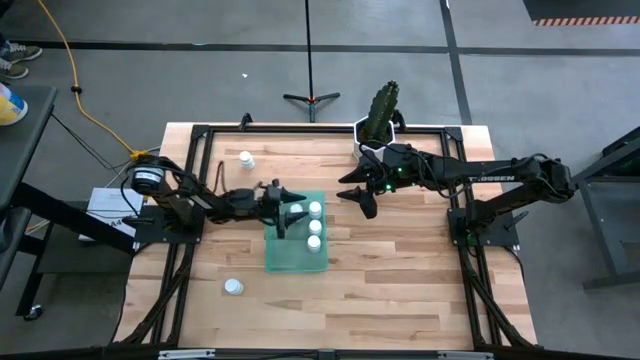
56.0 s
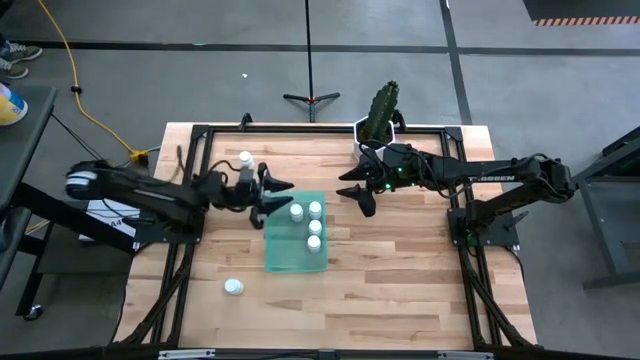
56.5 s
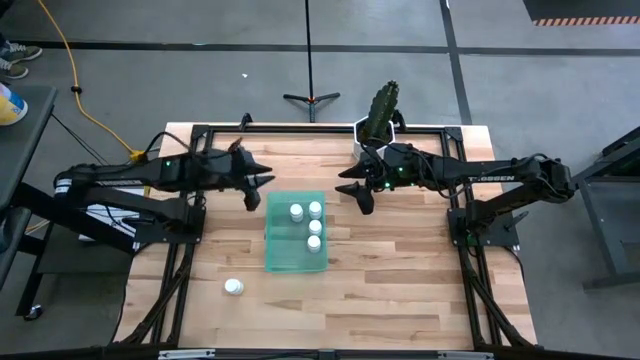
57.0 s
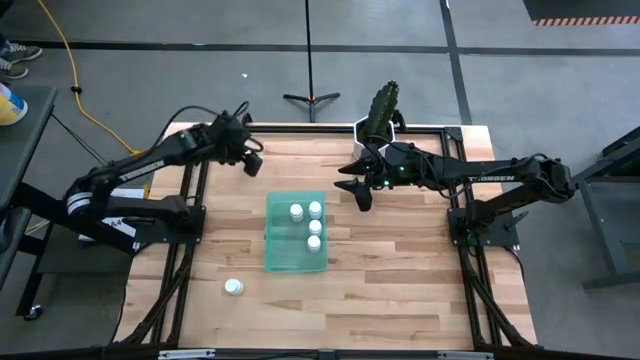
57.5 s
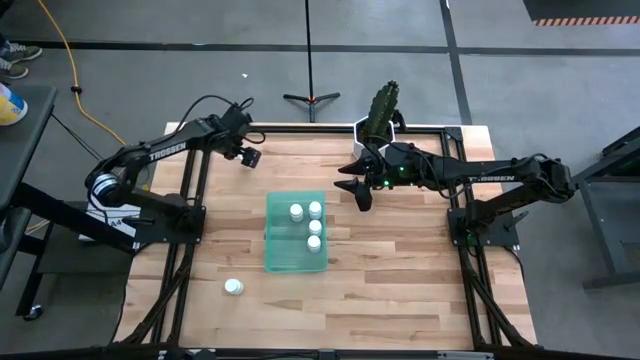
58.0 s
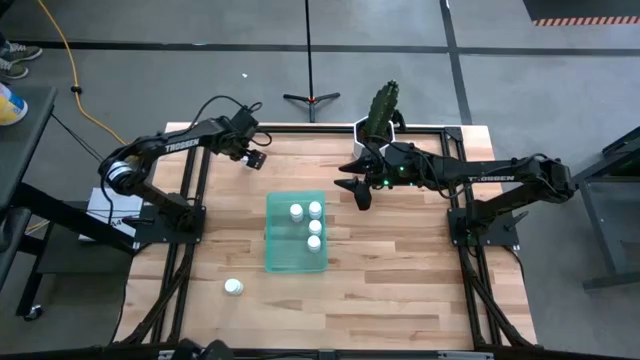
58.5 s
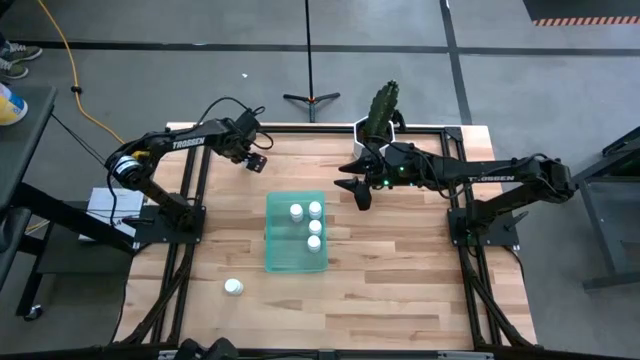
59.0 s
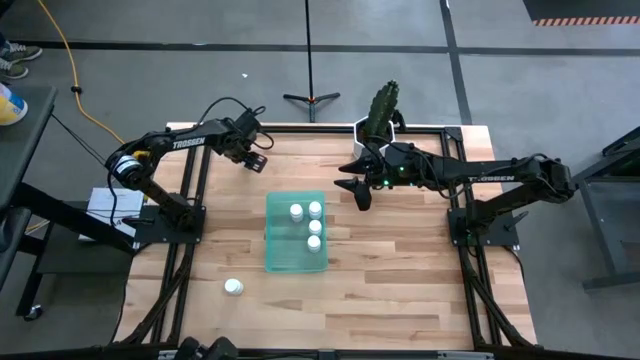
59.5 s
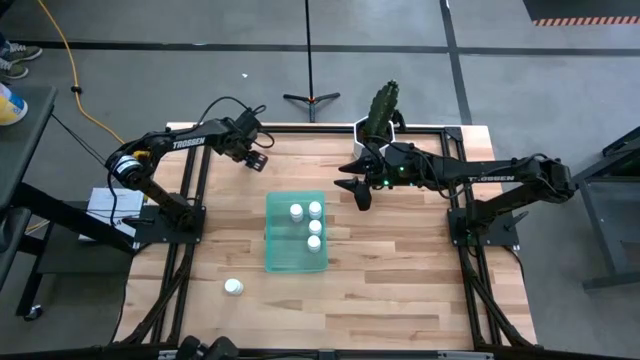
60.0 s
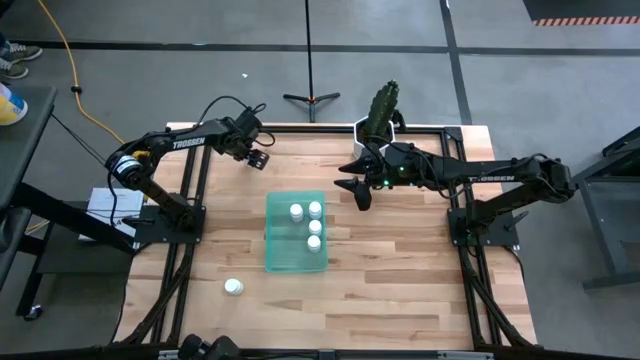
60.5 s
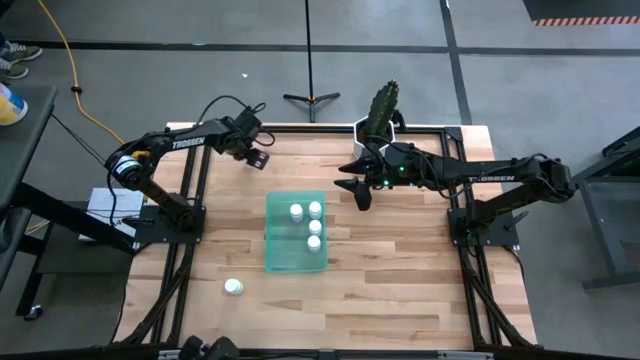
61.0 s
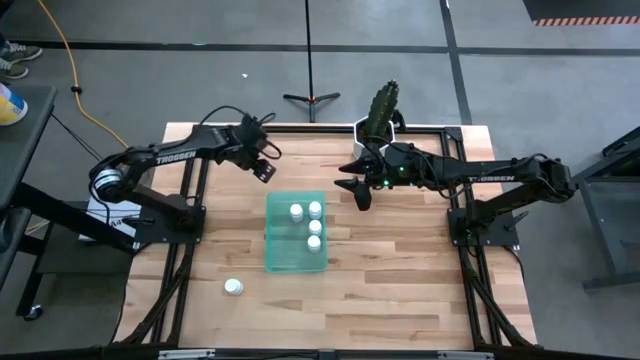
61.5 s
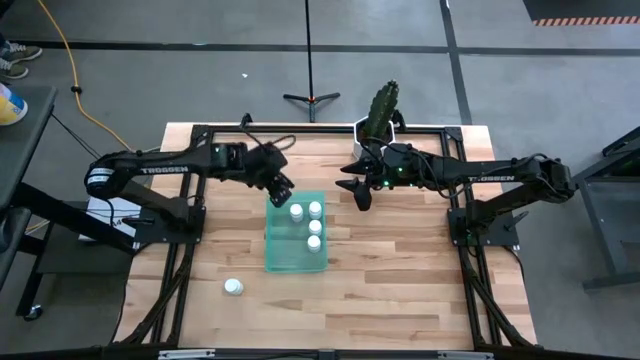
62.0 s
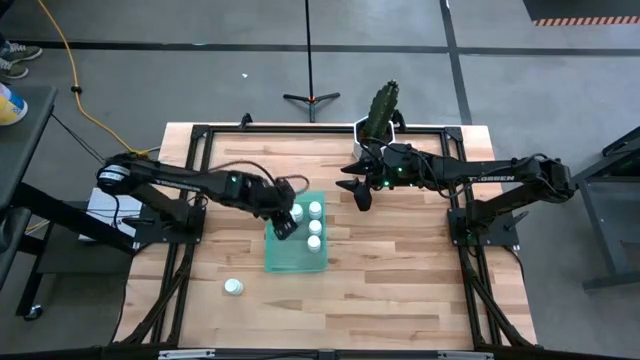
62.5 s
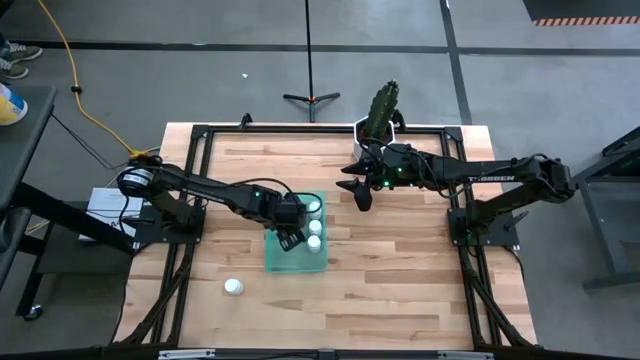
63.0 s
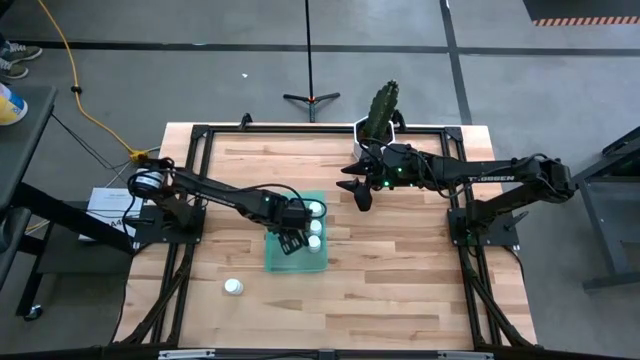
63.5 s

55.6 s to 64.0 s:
Task: Pick and place pill bottles into a basket
Put the pill bottle into the blue bin

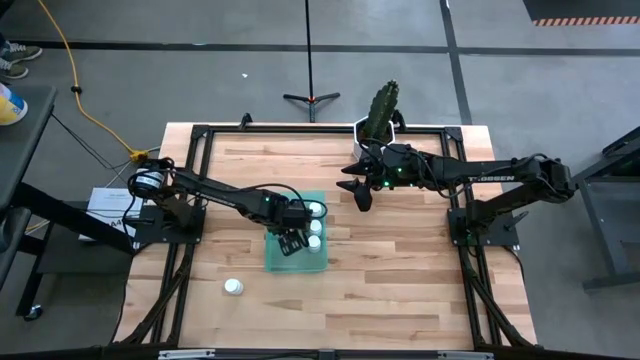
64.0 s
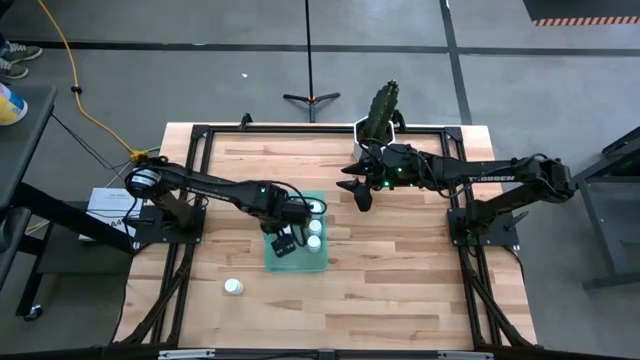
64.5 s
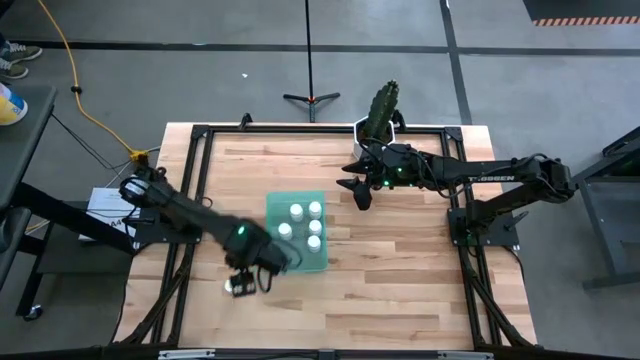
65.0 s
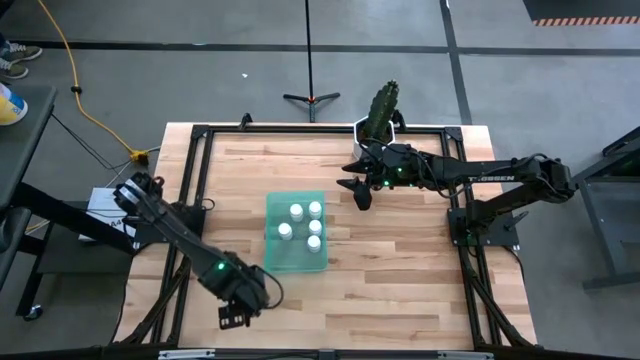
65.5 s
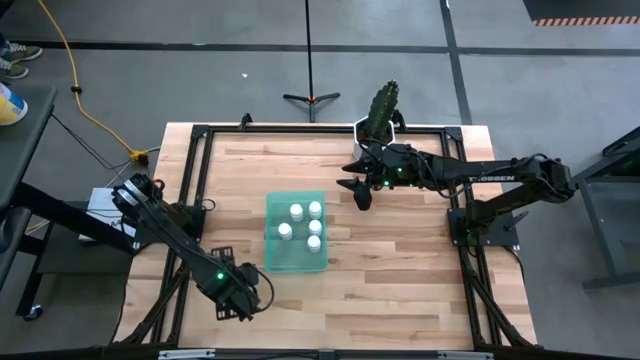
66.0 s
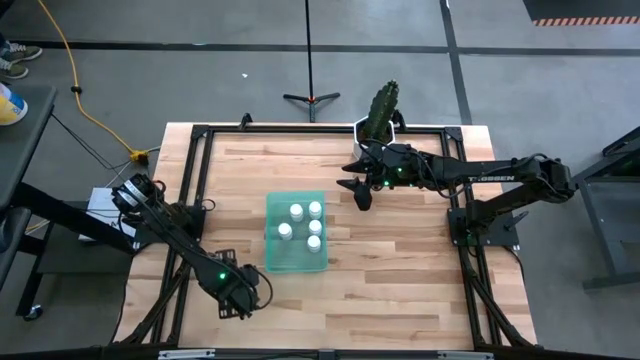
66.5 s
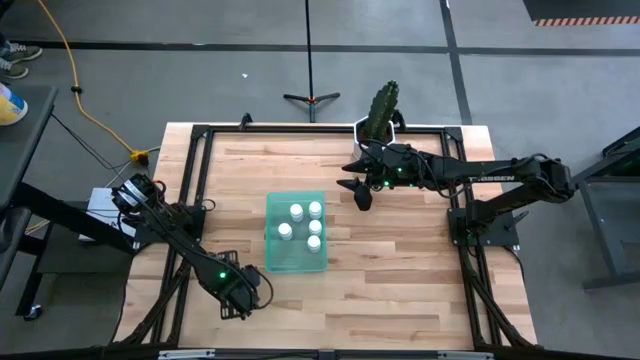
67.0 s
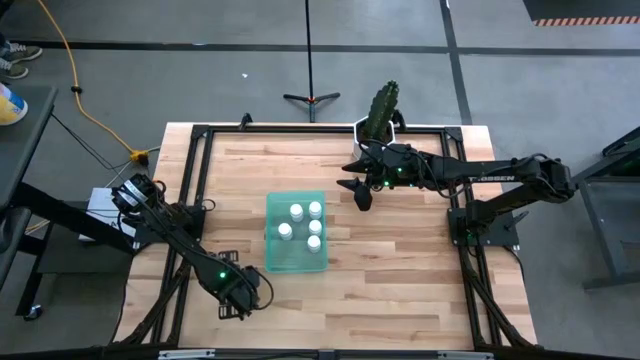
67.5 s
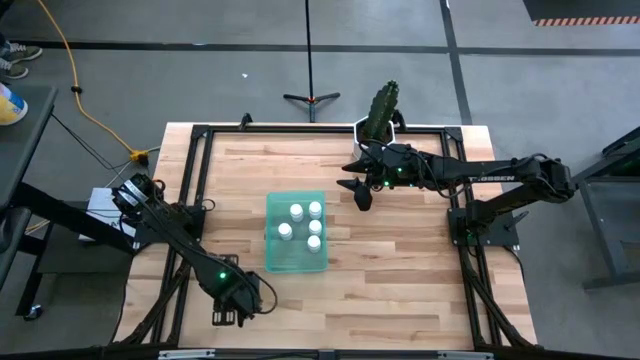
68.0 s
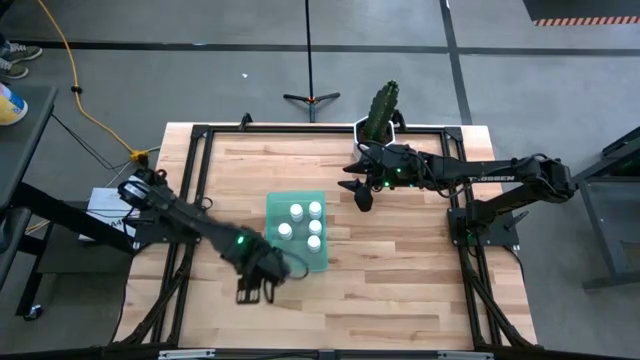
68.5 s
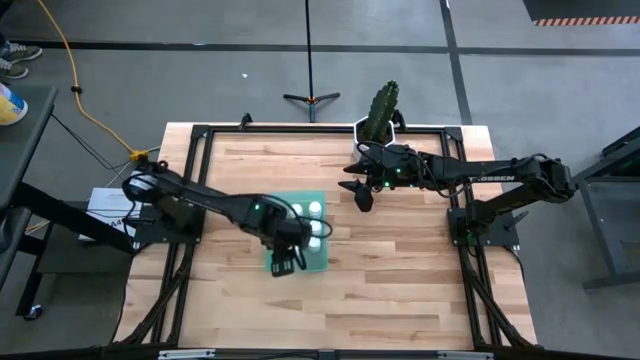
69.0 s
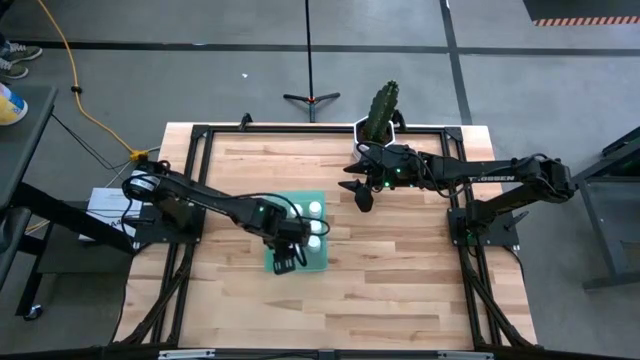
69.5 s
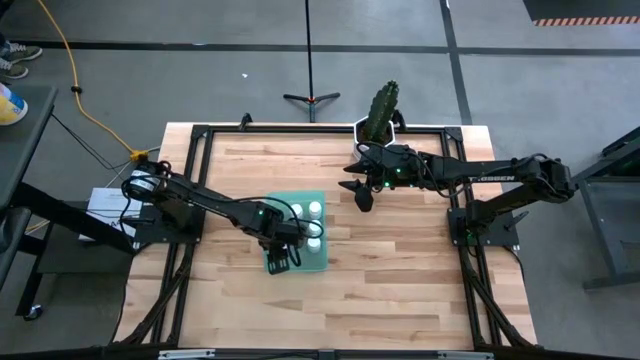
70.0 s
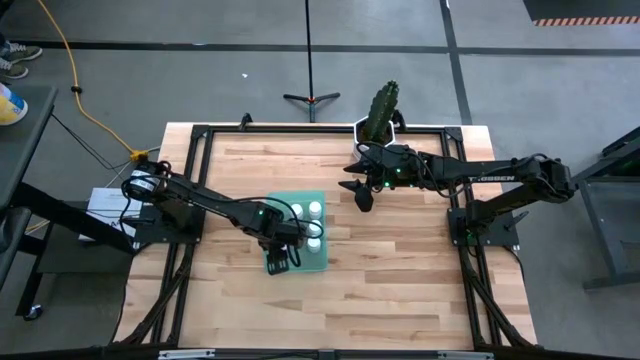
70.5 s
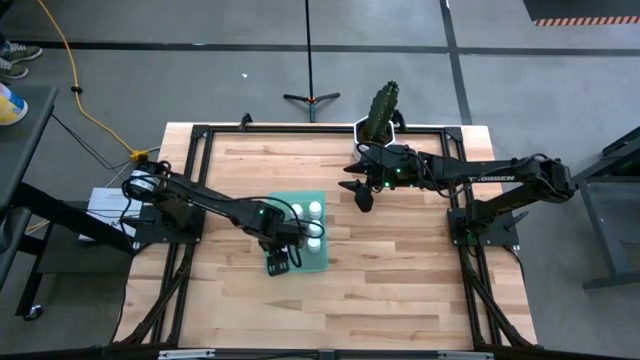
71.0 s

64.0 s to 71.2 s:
Put the pill bottle into the blue bin

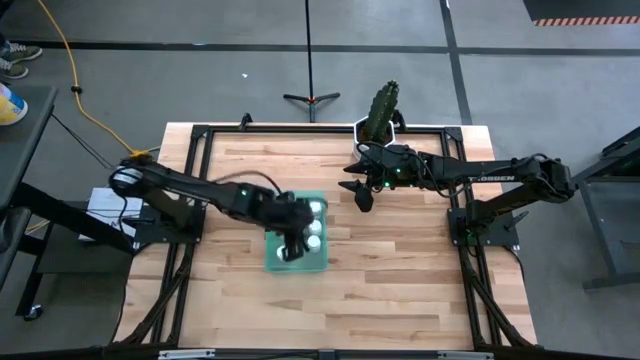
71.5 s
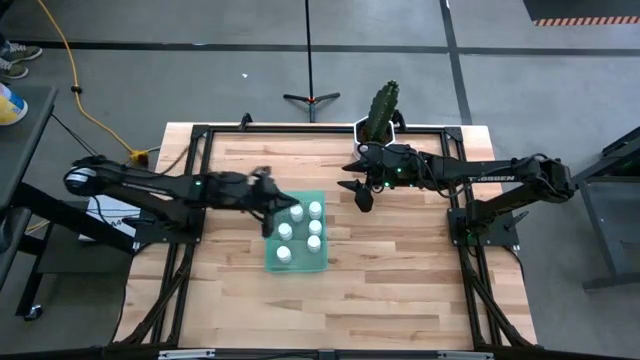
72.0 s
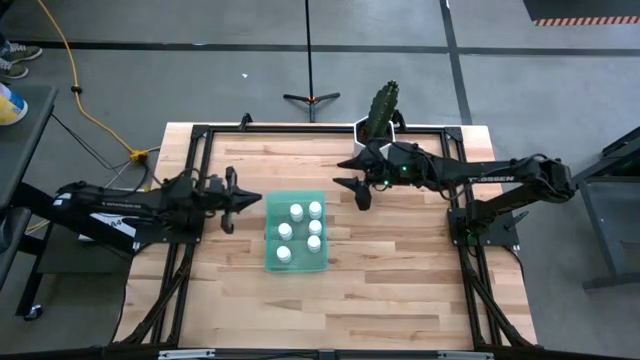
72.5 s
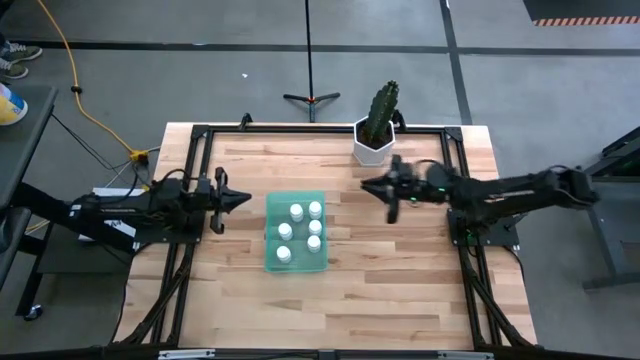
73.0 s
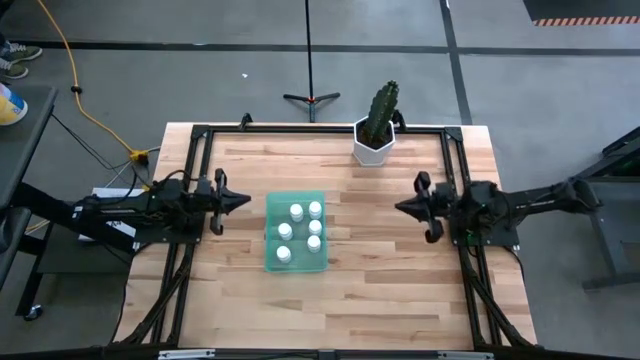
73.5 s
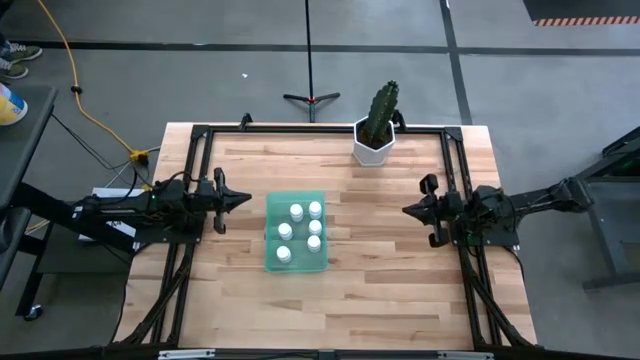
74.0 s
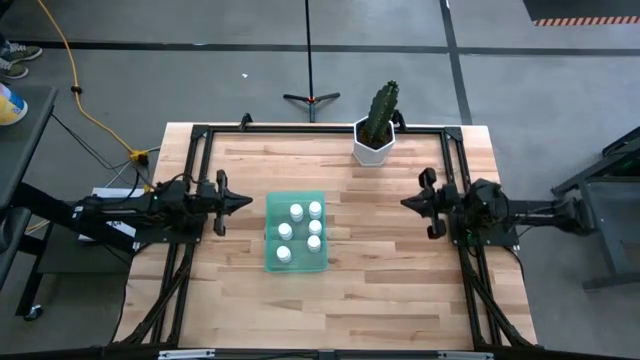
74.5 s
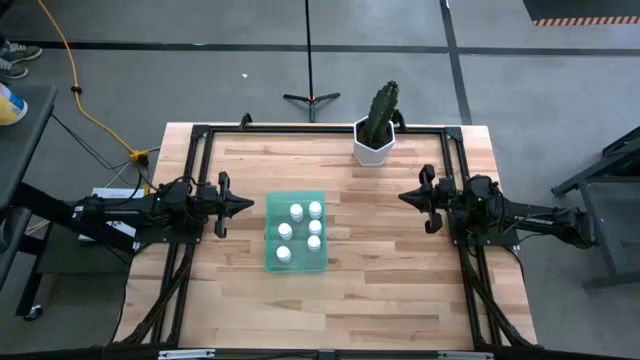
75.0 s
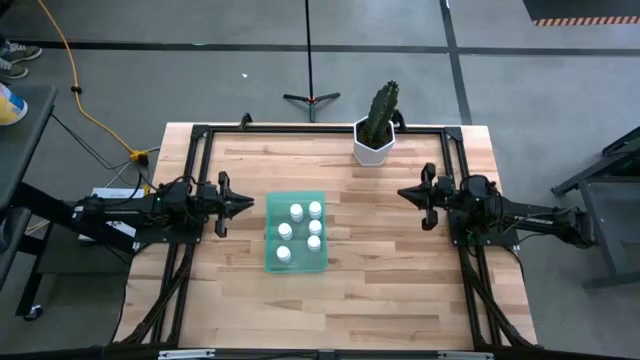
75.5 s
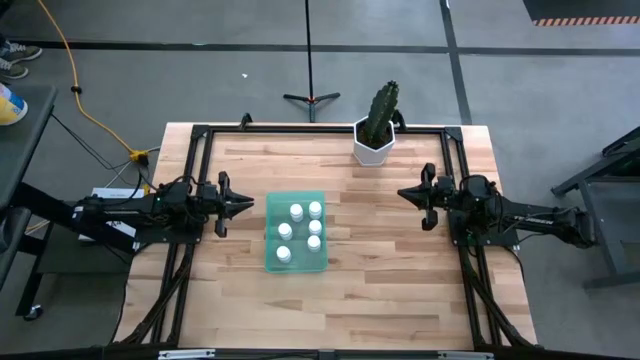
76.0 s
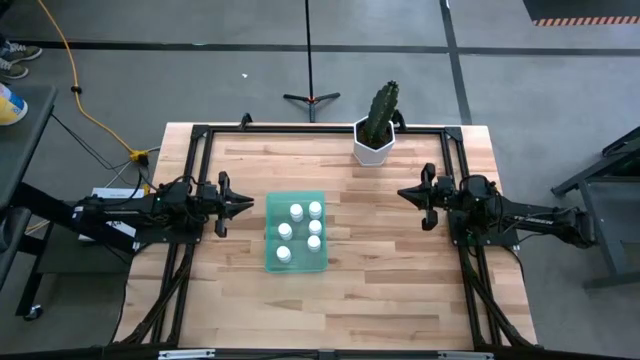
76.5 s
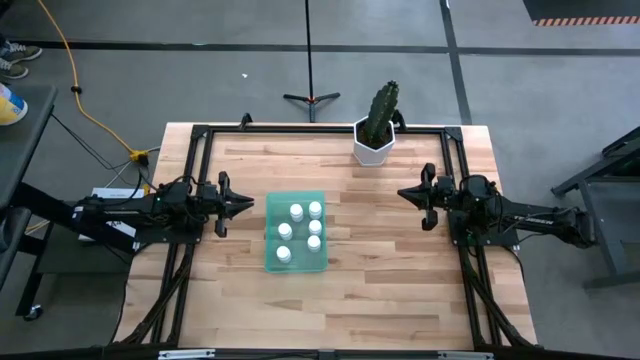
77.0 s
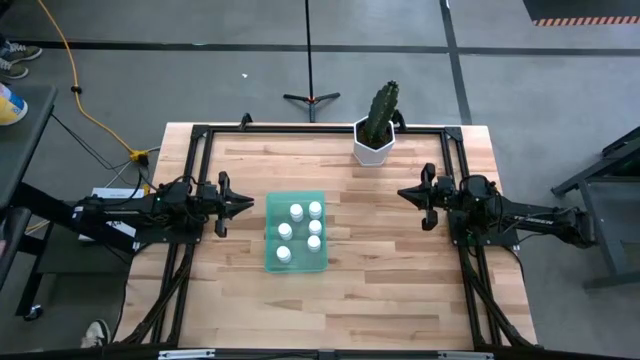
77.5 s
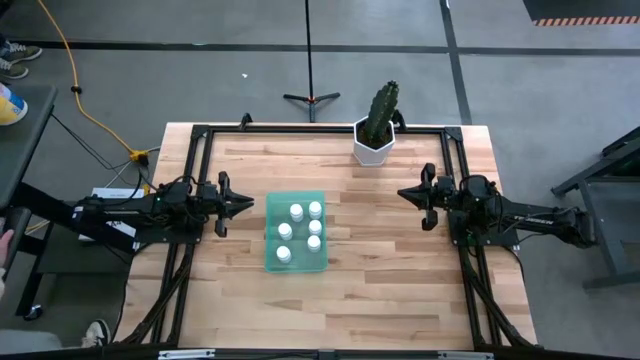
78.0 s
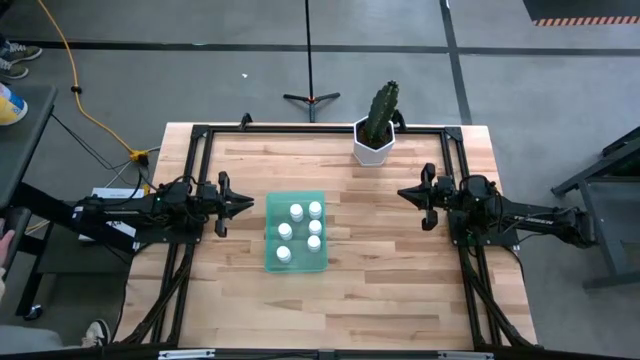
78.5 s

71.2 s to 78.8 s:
Return to Home Position
